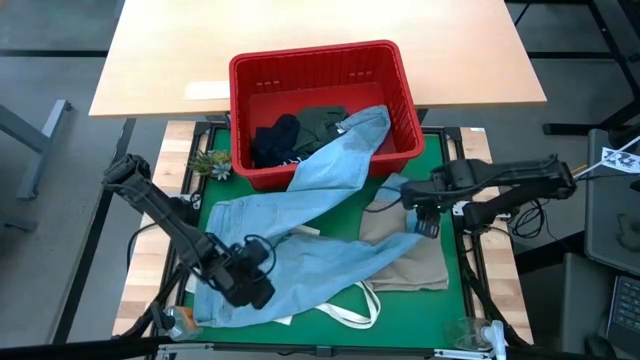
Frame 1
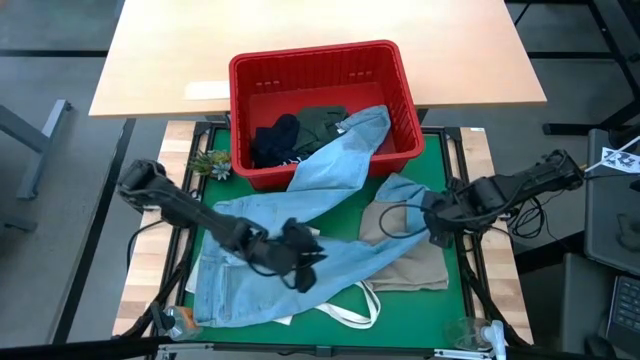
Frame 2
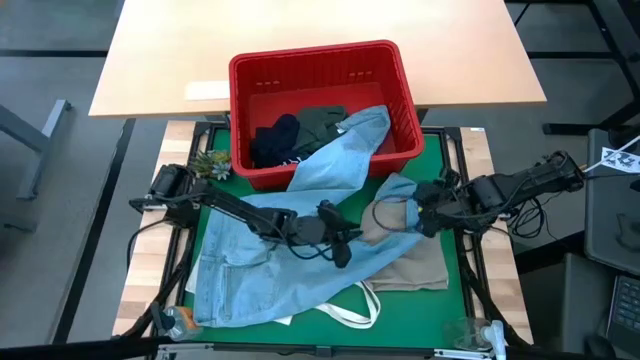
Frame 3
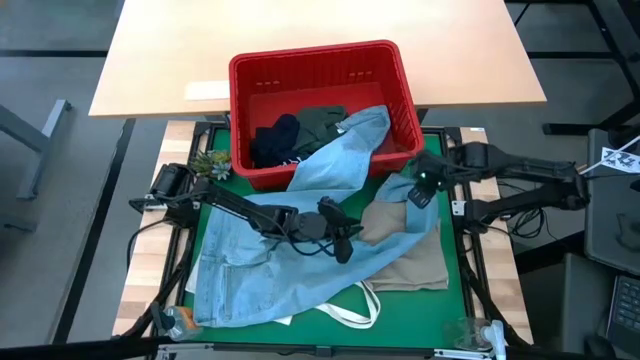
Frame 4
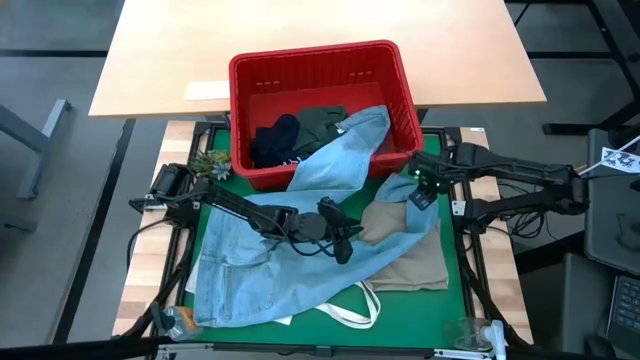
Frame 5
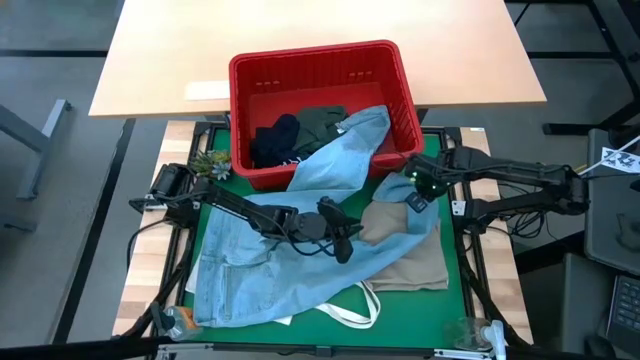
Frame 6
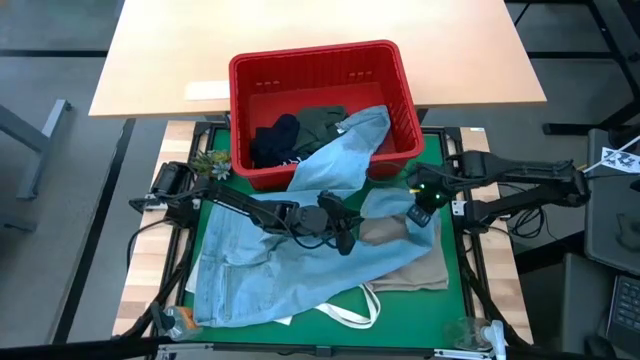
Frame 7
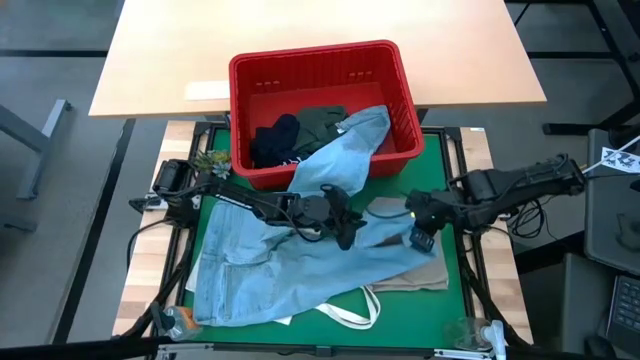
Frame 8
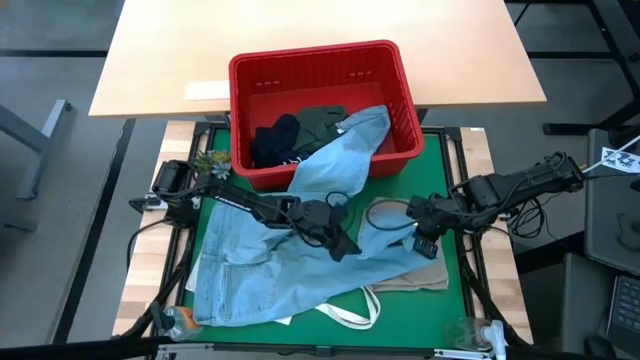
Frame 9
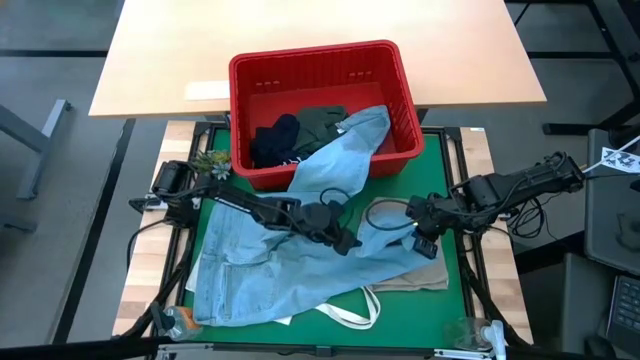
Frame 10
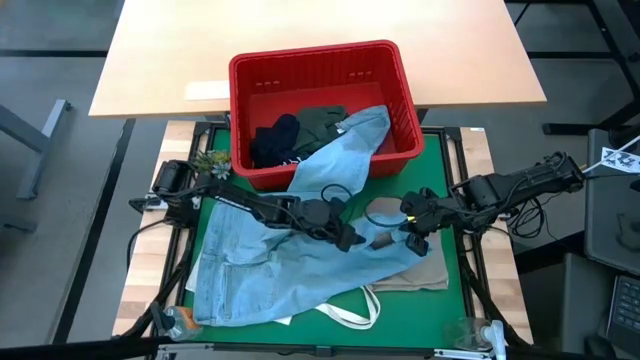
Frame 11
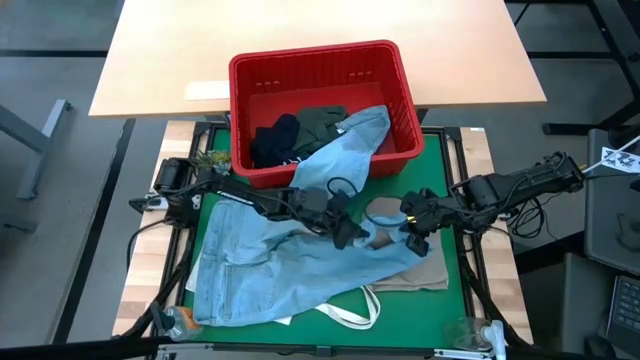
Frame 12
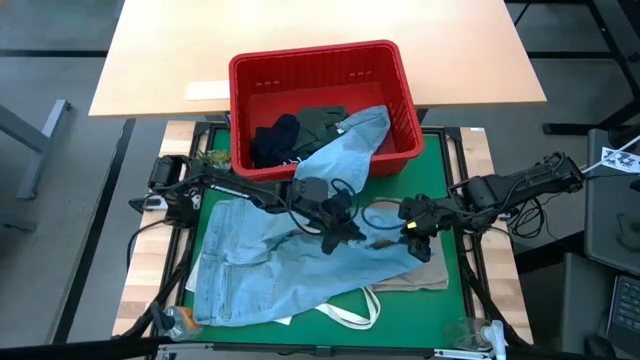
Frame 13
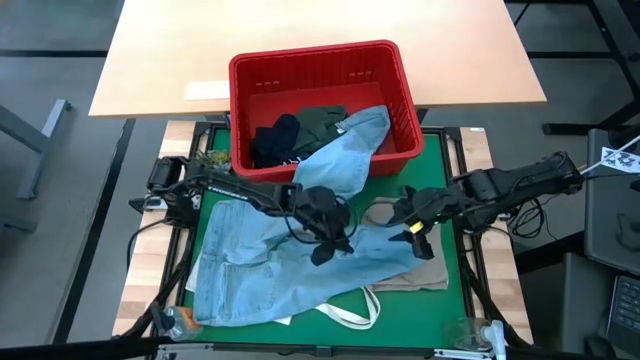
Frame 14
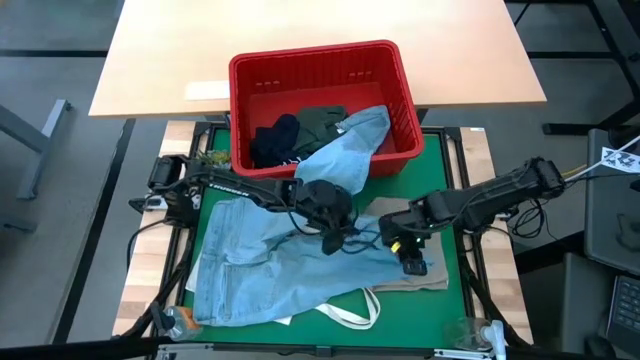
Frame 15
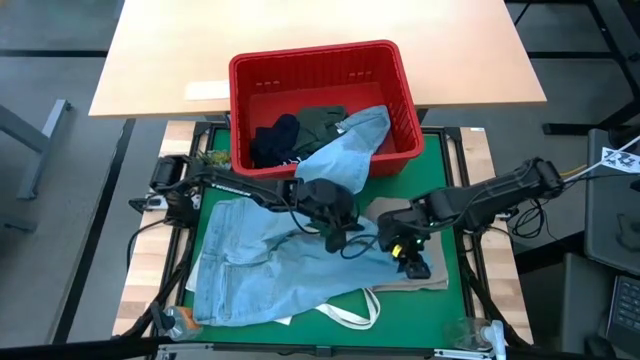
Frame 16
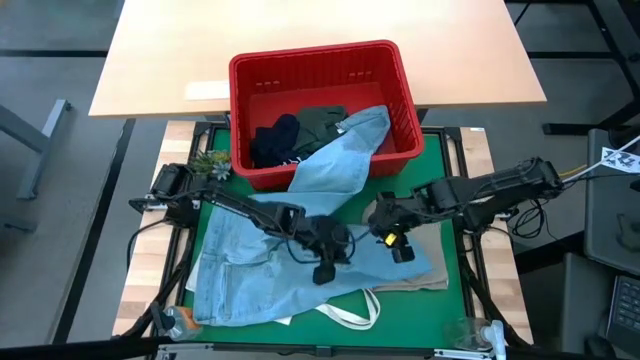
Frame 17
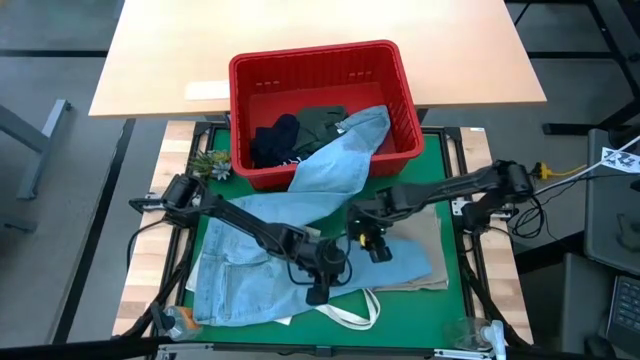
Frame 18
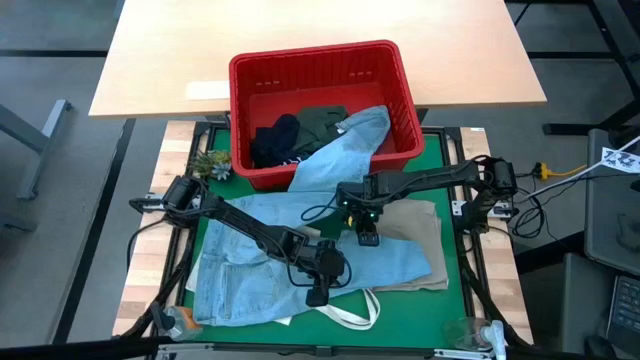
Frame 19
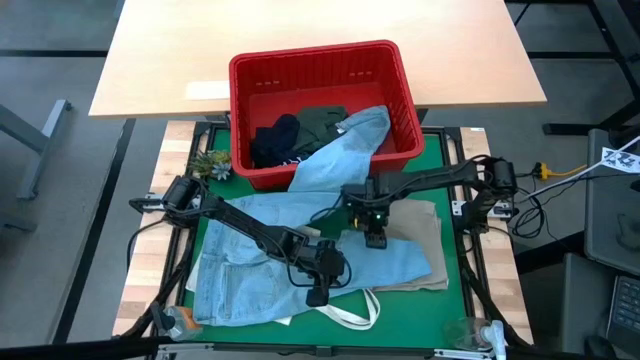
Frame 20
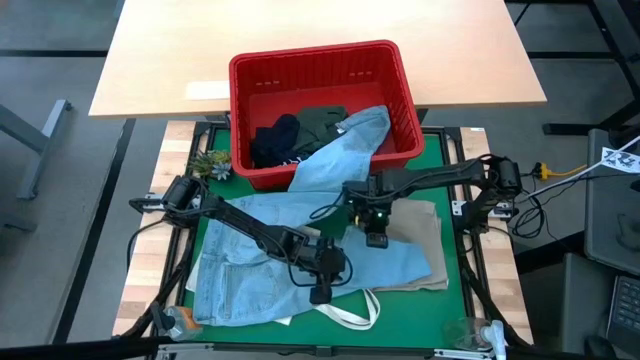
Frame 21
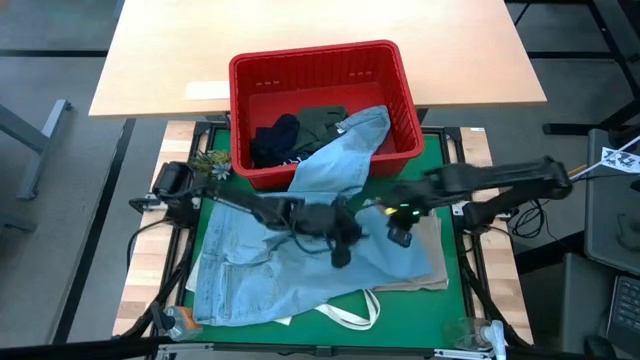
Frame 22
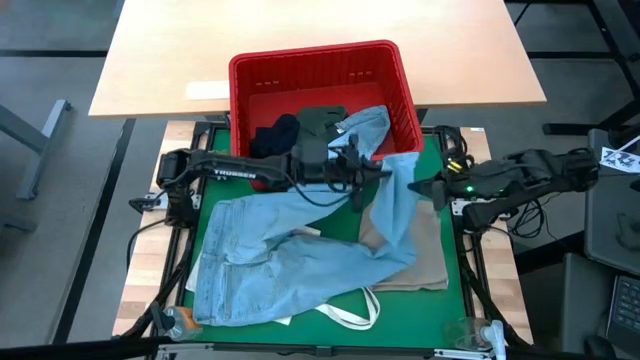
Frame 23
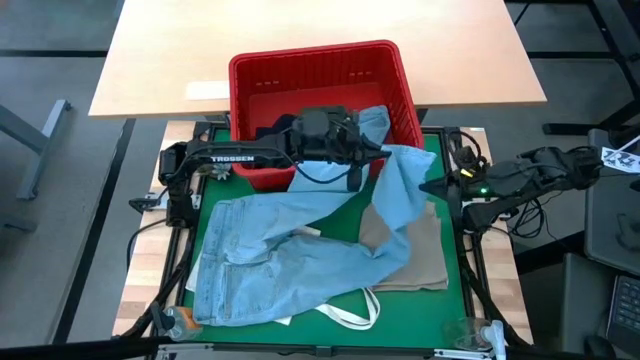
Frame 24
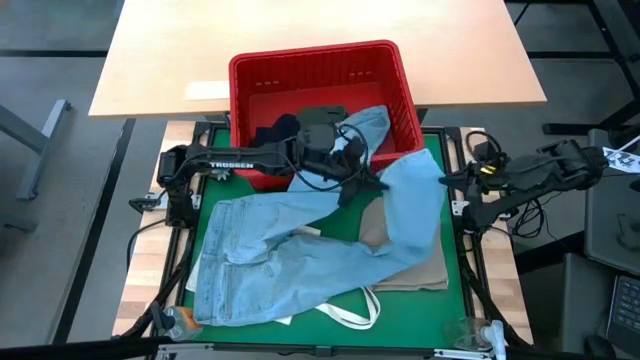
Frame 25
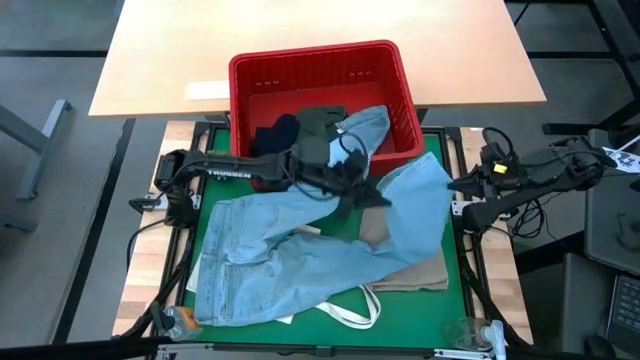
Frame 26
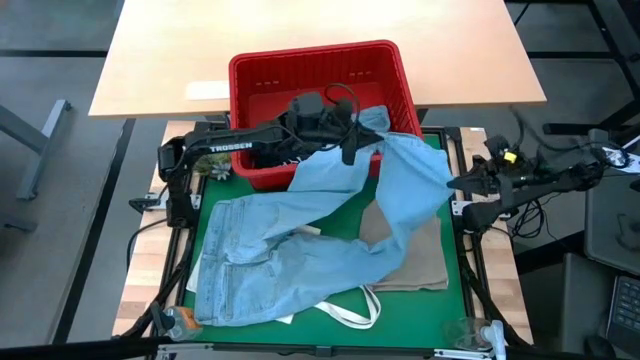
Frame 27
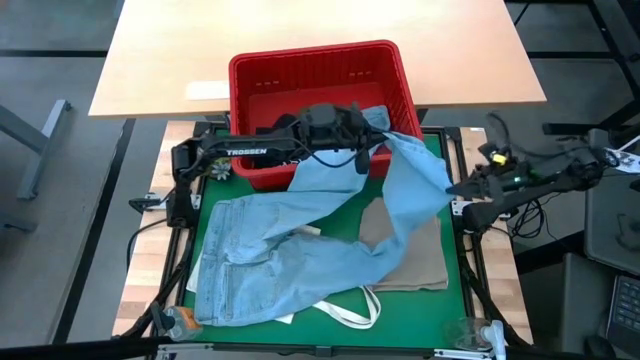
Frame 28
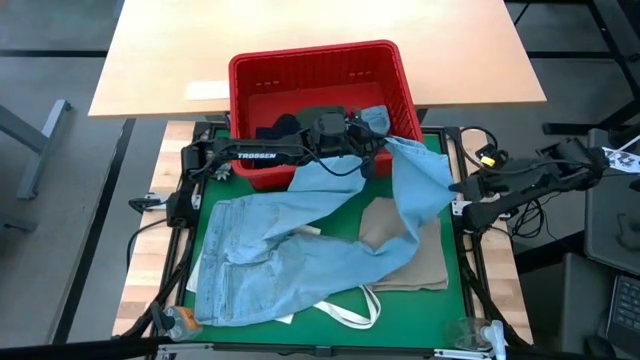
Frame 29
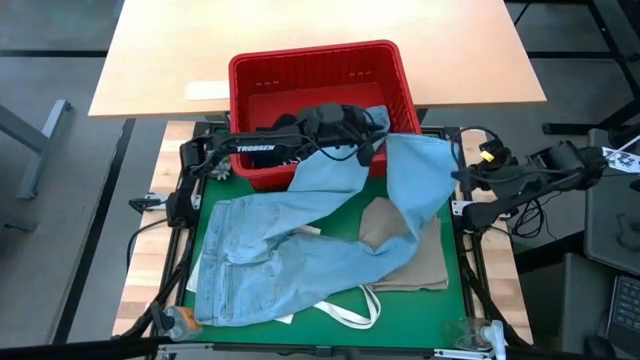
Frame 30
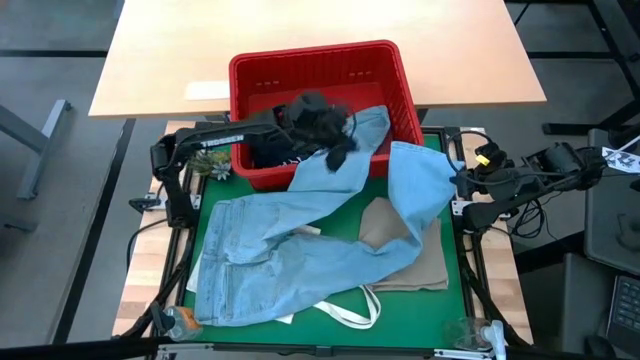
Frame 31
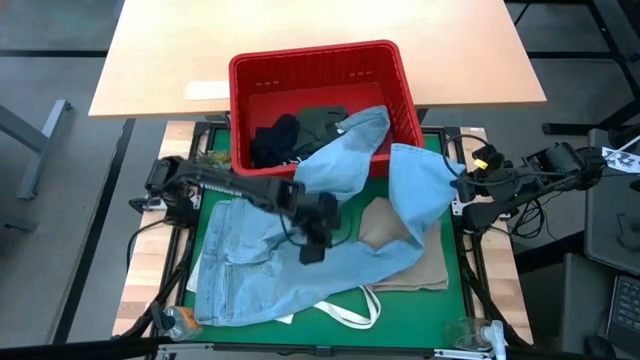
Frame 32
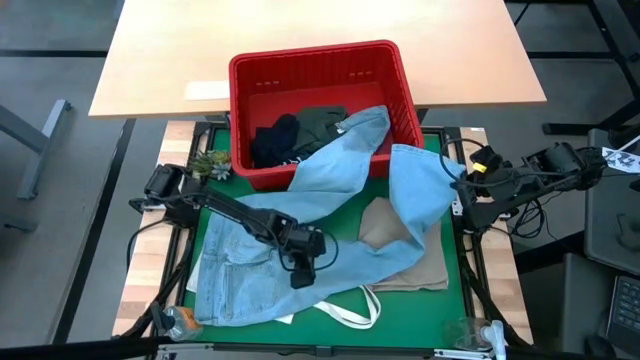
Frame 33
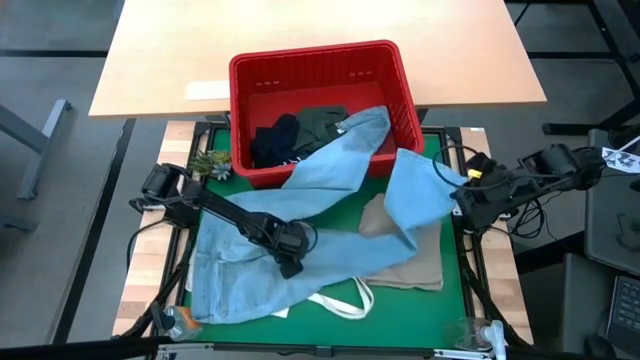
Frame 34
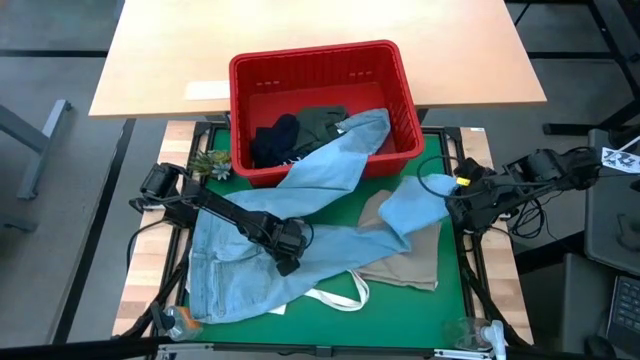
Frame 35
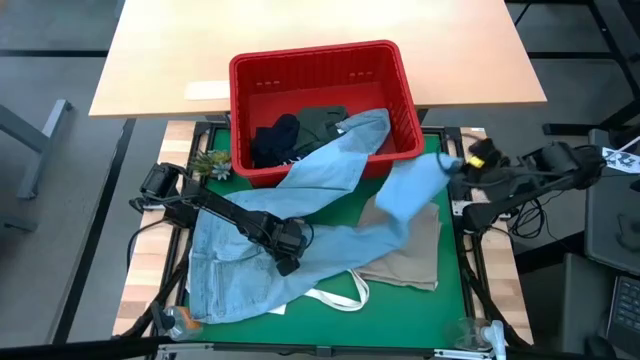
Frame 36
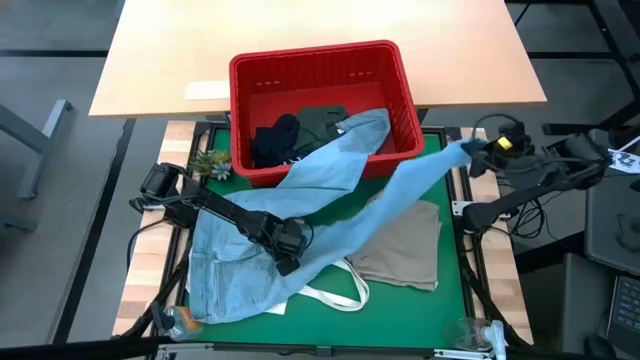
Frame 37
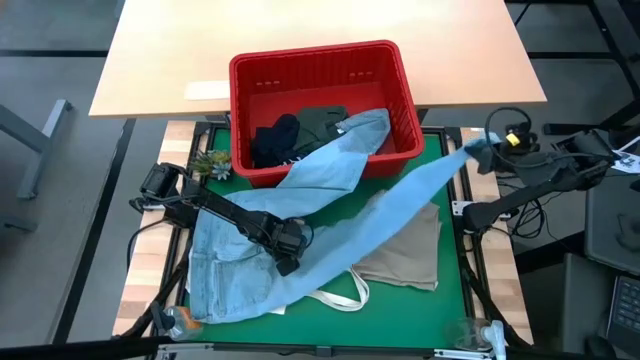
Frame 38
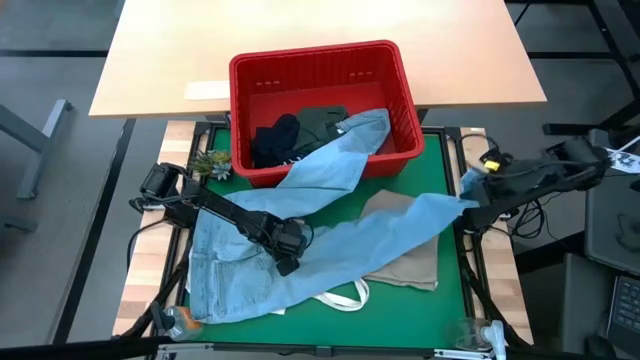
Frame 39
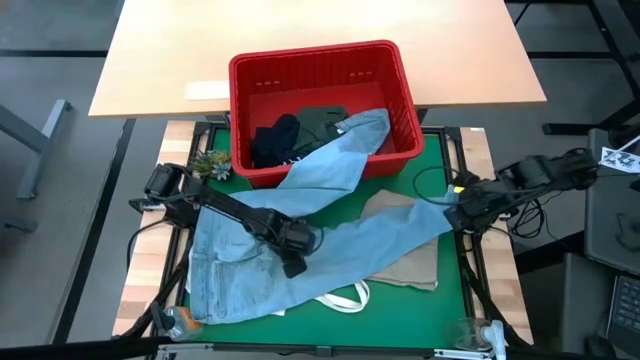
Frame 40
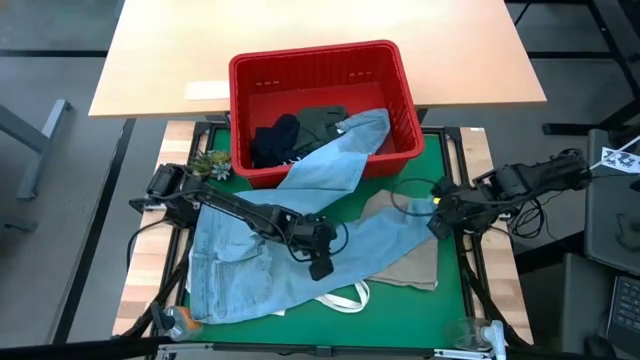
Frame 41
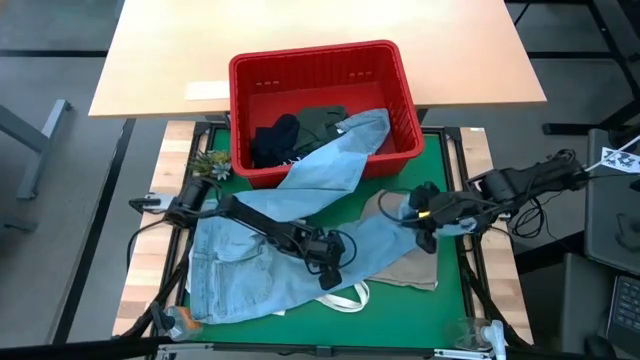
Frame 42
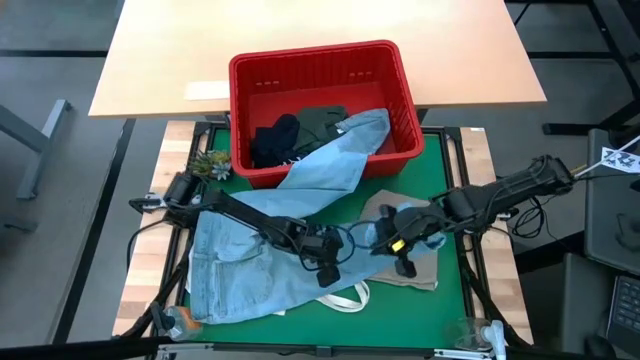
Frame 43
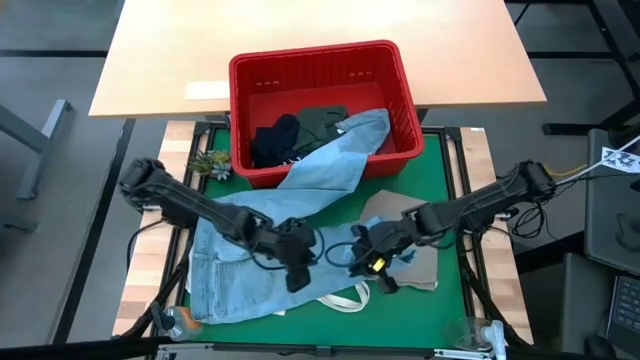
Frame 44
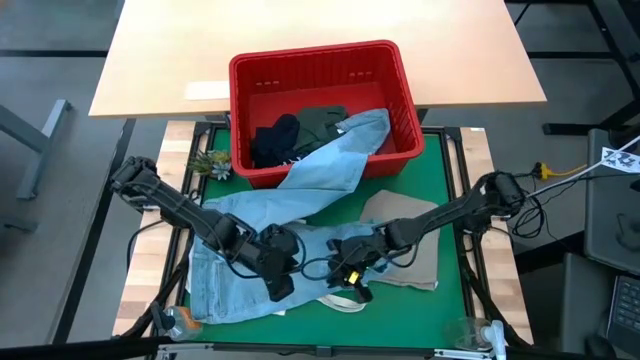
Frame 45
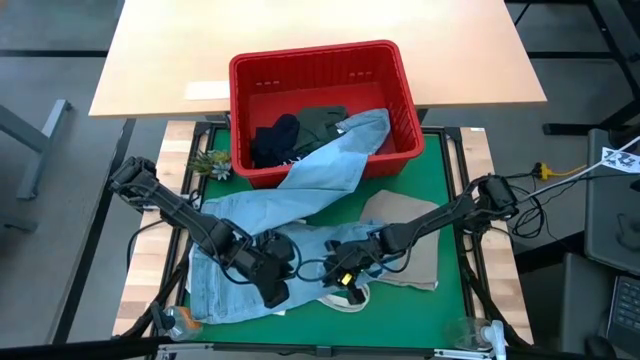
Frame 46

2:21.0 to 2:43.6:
Task: Fold Laundry from Bin
Fold the light blue pants
